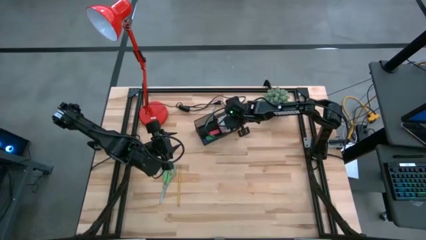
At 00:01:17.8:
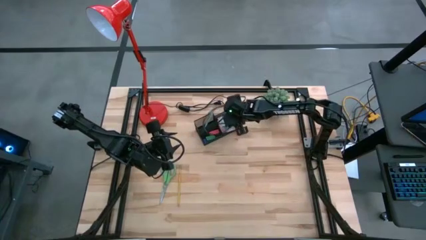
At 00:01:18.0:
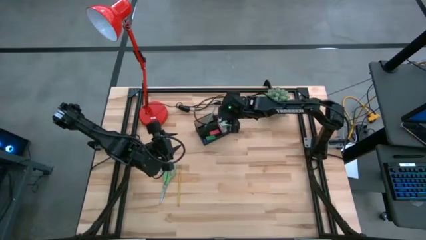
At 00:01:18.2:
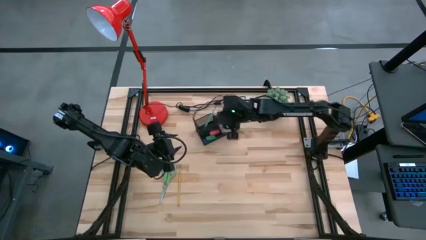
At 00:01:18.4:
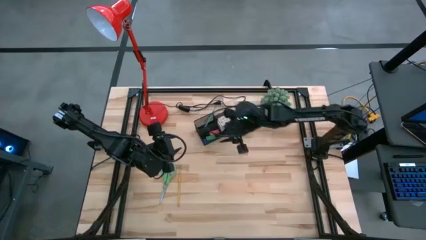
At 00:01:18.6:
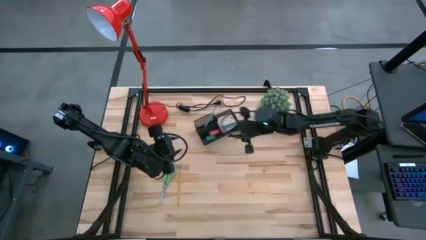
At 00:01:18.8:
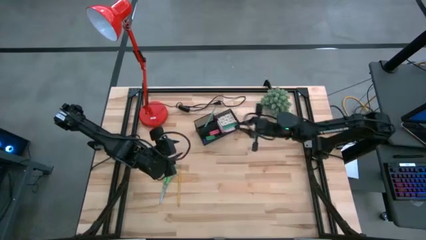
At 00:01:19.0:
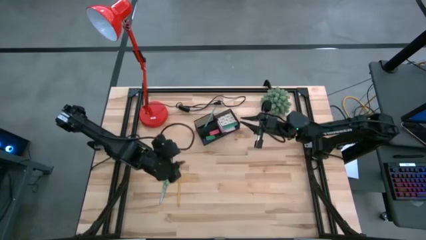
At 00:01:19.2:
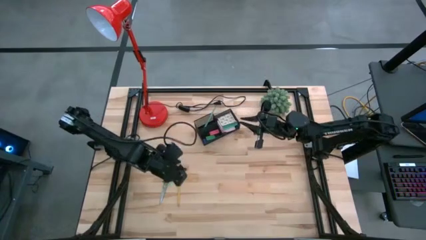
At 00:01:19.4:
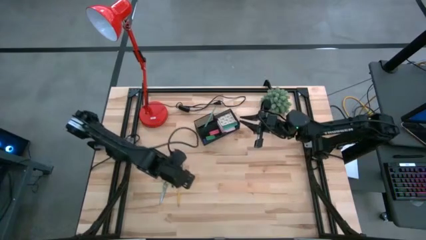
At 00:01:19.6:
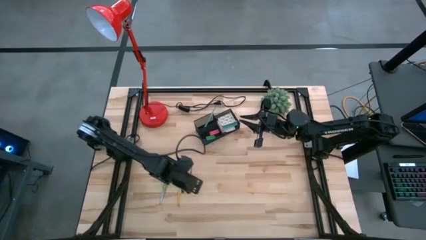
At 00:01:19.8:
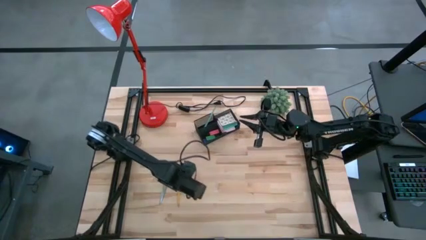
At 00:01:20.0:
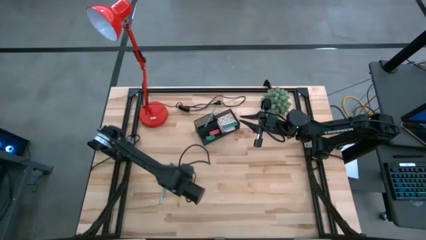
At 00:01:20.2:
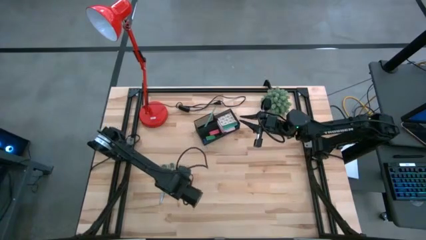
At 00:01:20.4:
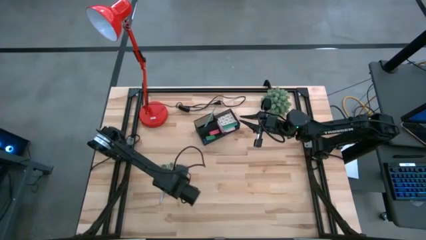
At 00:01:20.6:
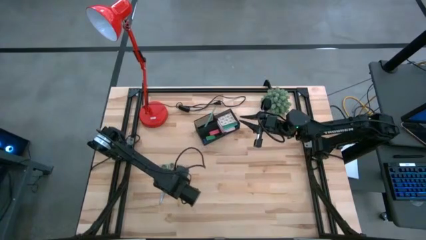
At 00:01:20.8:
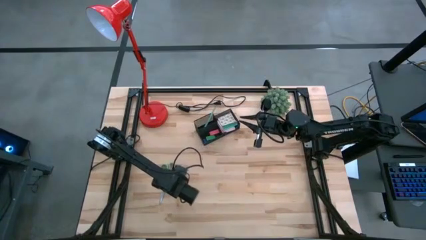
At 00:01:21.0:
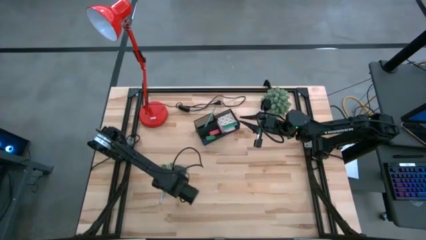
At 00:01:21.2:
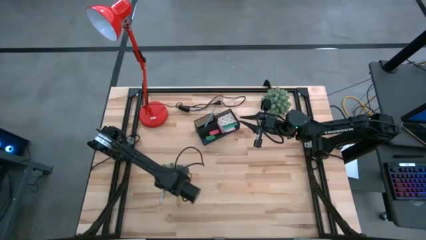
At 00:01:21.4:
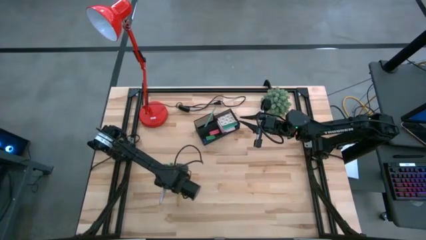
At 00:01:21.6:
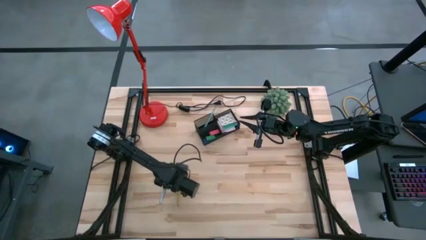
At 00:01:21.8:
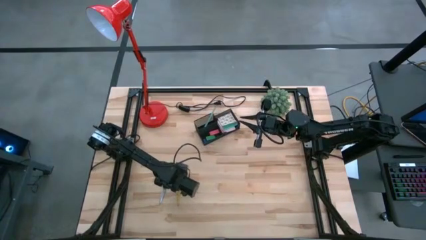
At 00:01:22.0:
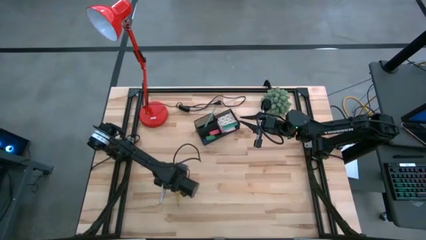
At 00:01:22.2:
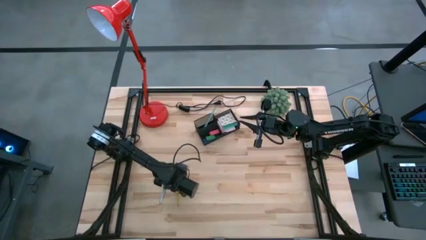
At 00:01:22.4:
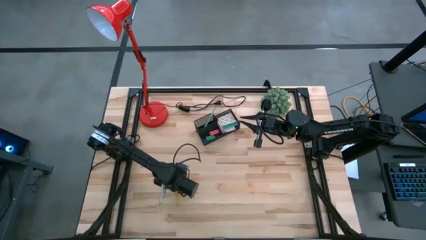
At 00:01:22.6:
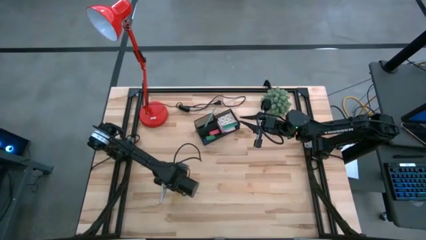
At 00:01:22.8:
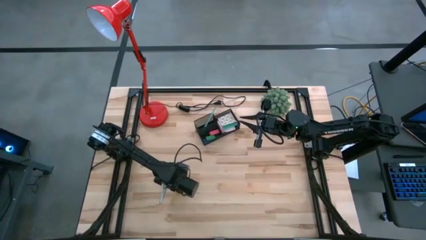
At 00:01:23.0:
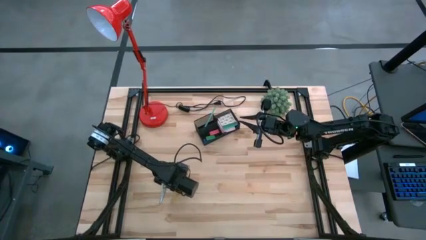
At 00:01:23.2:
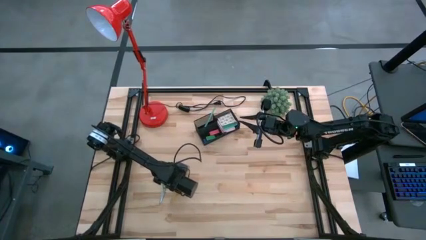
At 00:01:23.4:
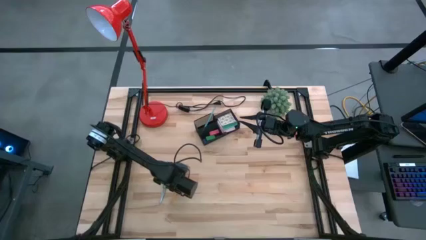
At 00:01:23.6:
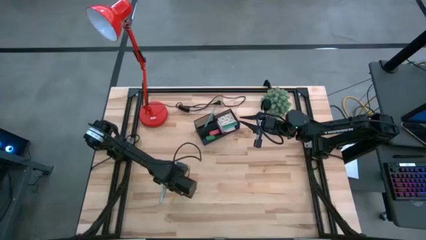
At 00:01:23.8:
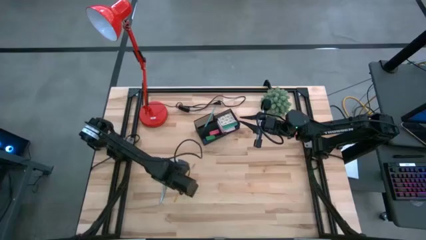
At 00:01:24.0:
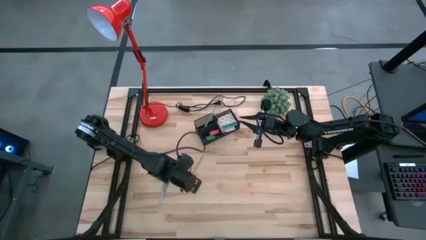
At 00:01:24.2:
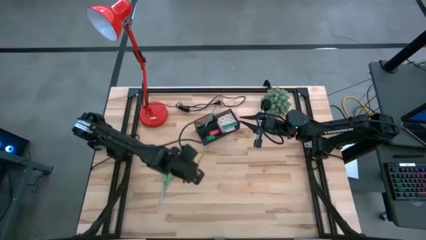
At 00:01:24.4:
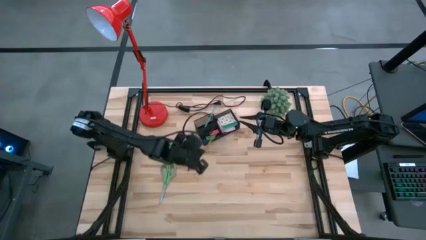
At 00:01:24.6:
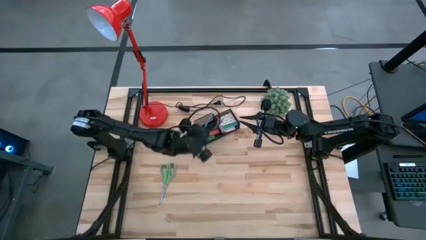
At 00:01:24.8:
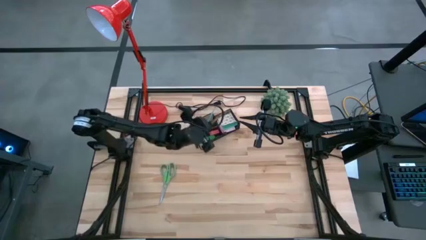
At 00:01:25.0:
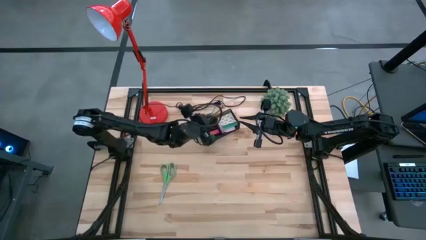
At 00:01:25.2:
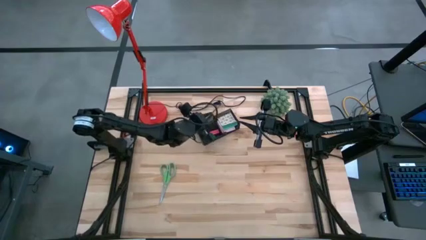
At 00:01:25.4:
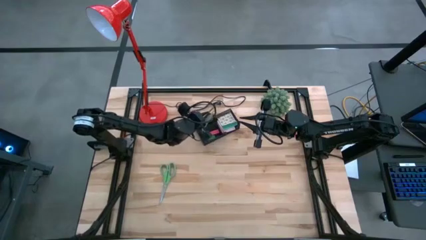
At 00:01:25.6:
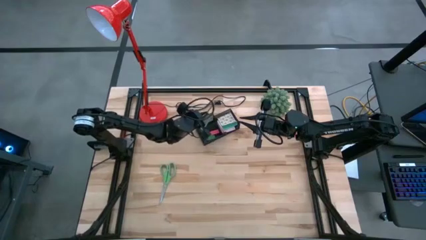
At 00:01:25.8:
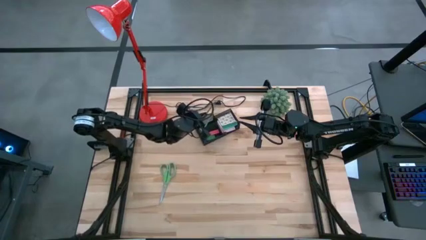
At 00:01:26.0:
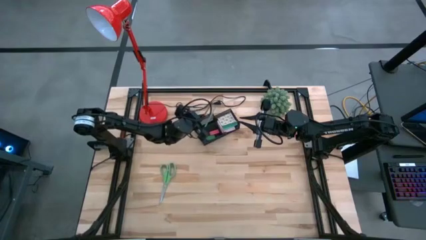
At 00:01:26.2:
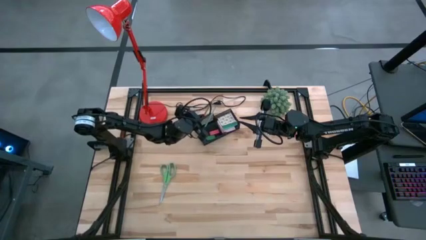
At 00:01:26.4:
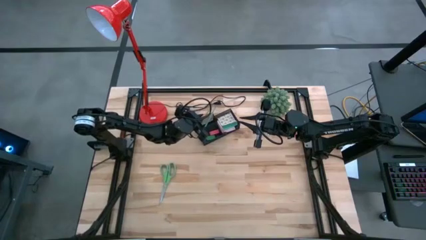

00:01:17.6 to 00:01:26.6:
Task: Pick and place office supplies into organizer
Put the yellow pencil into the desk organizer

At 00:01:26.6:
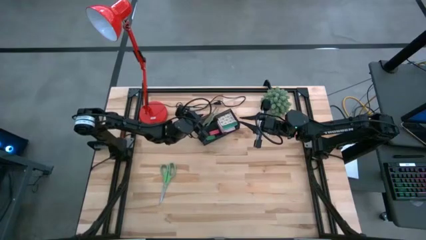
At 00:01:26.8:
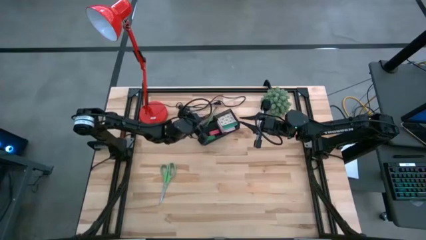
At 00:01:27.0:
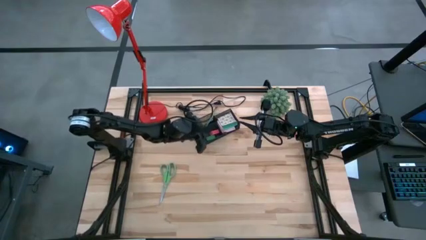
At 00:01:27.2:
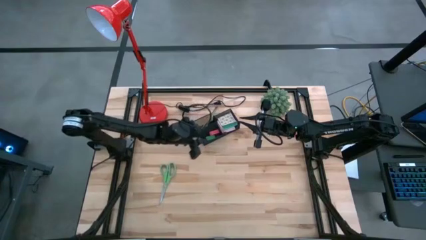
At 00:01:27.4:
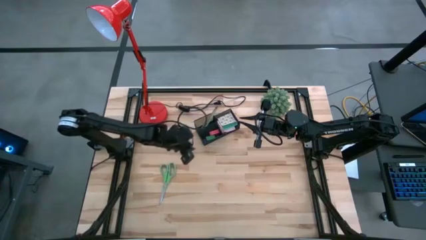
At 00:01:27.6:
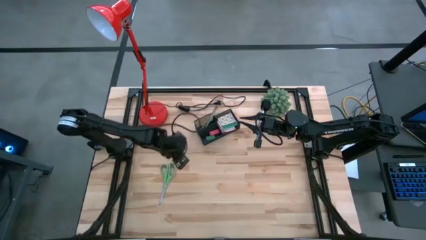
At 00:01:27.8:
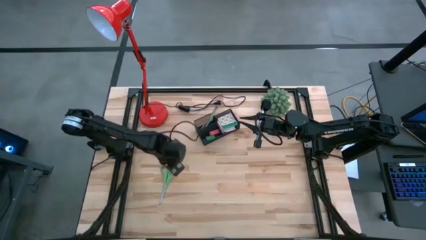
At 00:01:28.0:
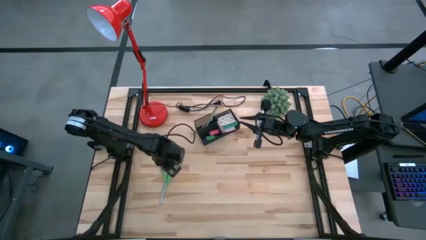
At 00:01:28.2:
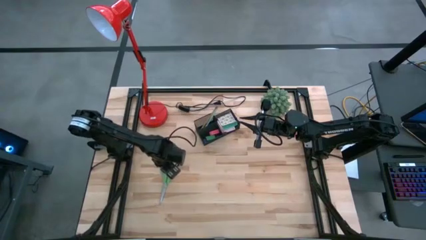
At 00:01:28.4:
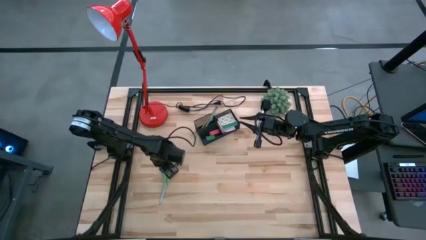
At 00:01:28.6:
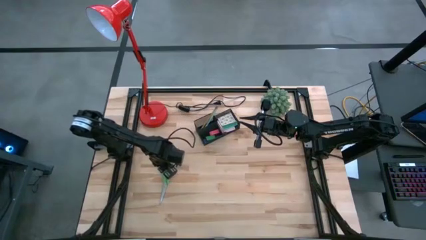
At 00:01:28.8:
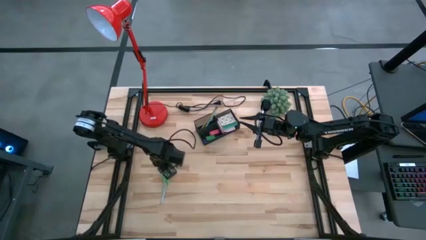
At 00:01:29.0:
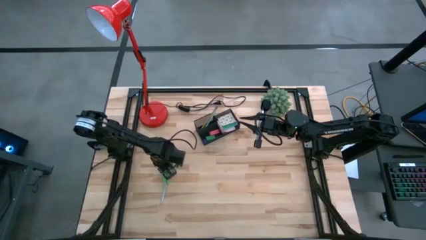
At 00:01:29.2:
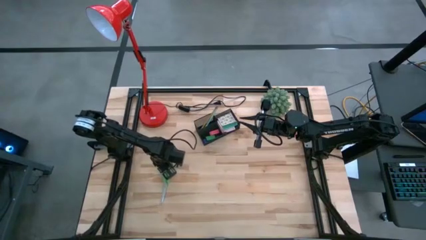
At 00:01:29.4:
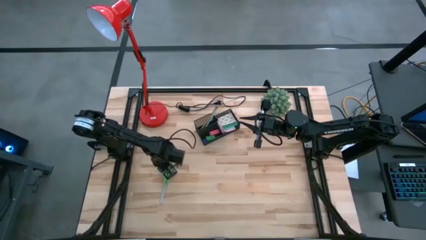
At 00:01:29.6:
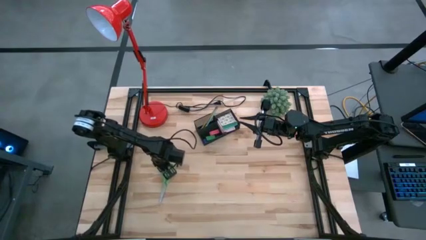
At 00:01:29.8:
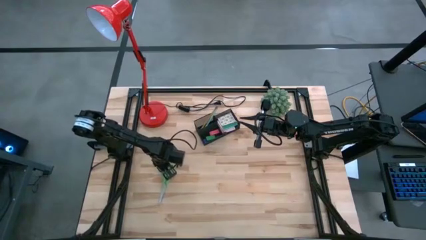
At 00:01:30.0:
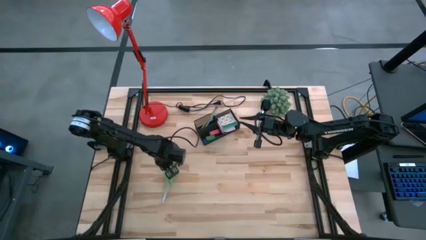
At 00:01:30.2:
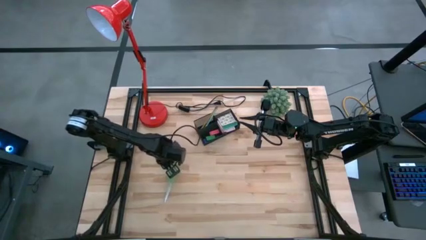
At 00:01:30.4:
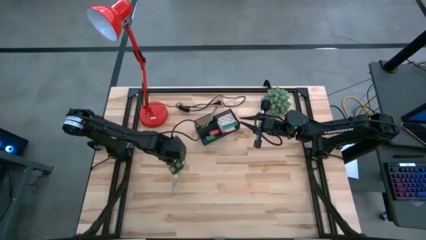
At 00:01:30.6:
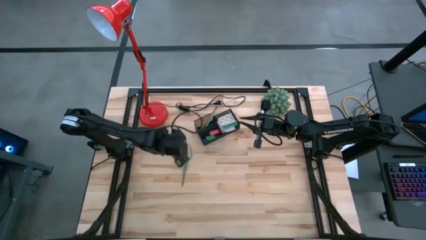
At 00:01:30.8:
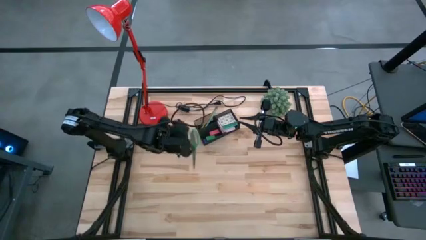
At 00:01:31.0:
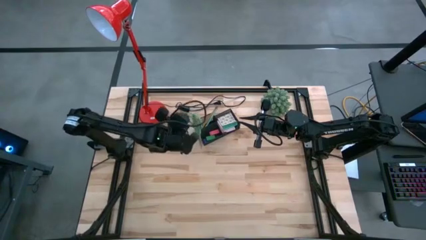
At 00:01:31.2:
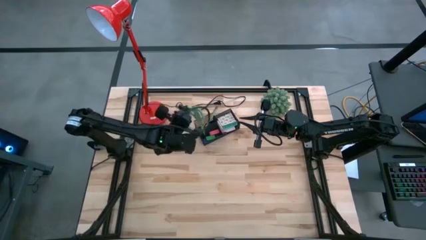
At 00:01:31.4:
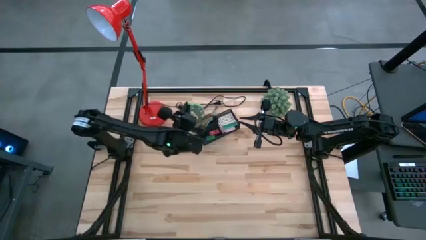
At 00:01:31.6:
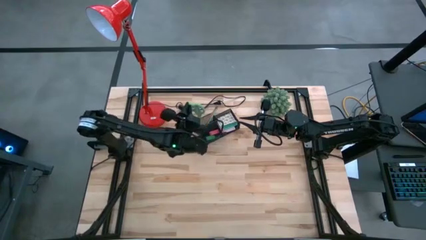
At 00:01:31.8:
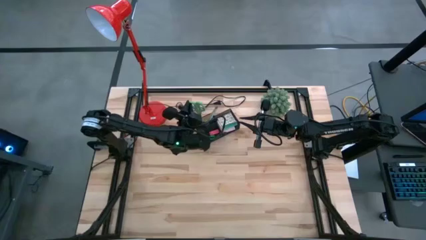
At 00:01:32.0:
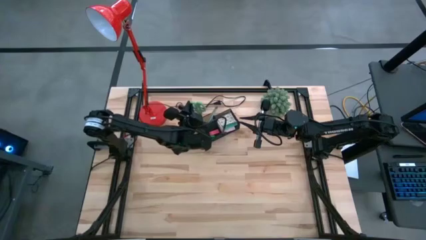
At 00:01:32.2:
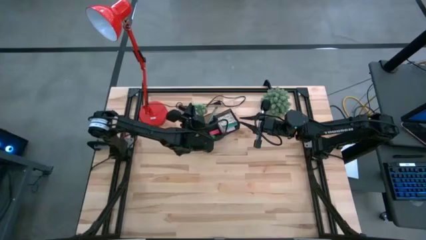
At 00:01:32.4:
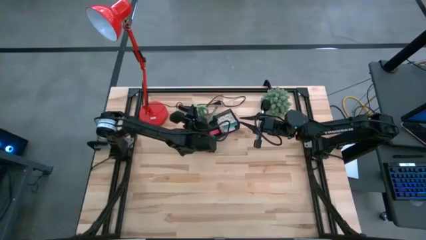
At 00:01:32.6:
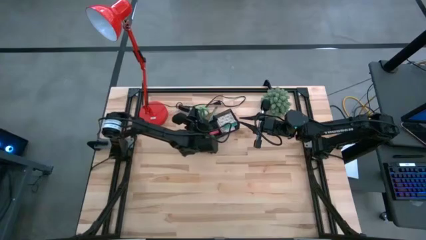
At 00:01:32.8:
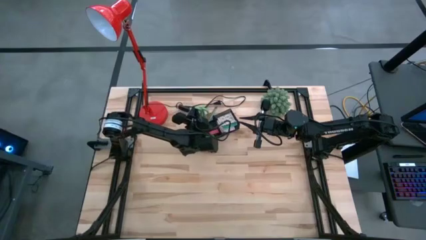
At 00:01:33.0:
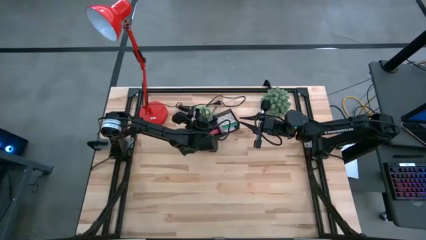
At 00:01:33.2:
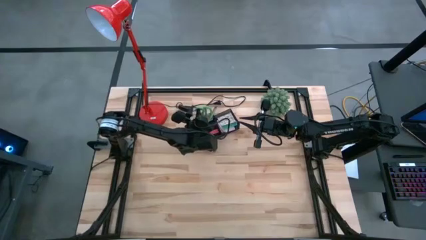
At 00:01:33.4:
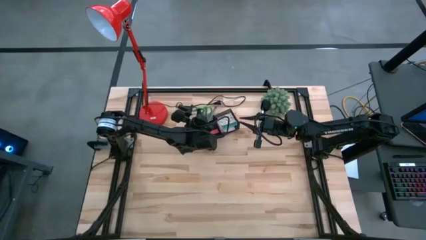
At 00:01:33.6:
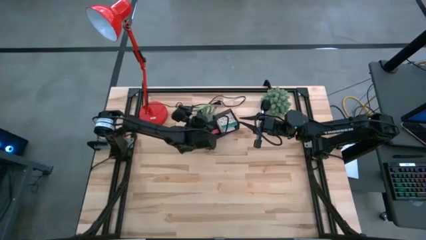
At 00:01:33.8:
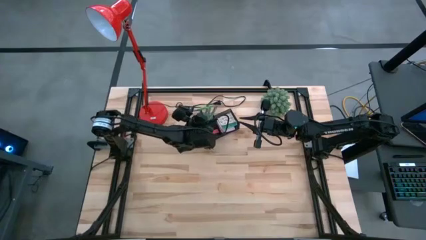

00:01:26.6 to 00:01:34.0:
Put the green scissors into the desk organizer
